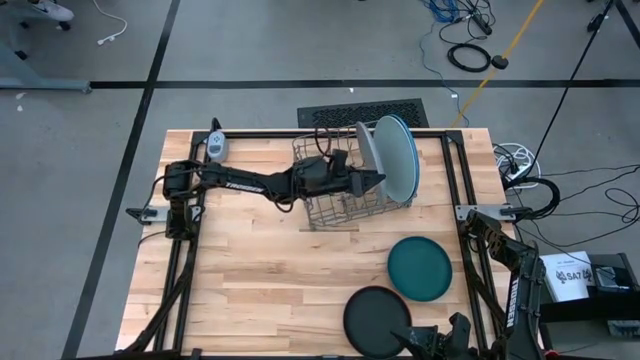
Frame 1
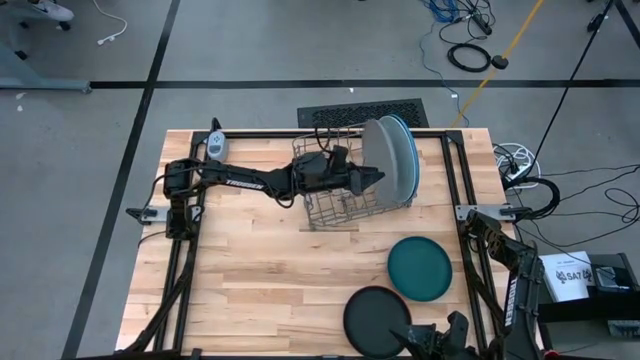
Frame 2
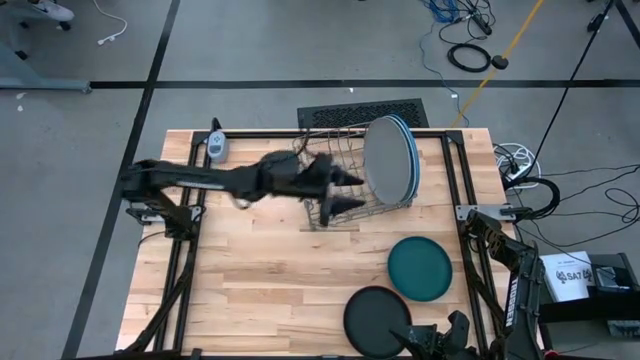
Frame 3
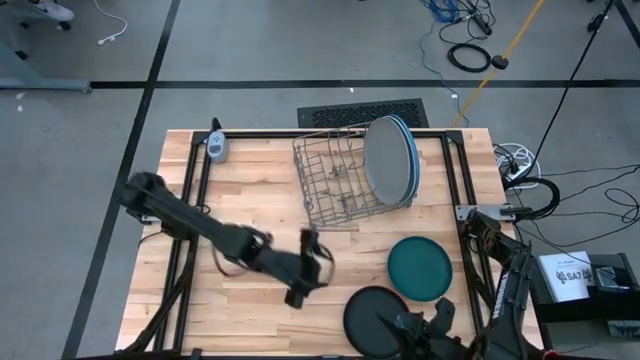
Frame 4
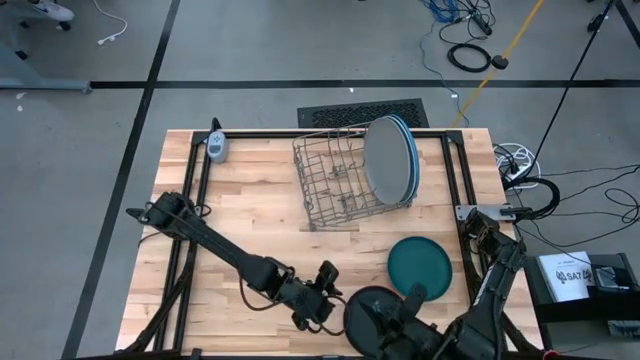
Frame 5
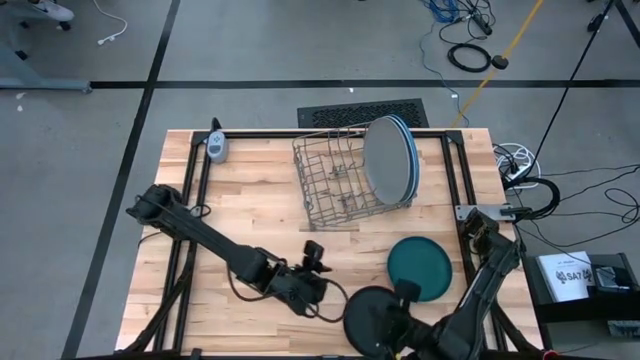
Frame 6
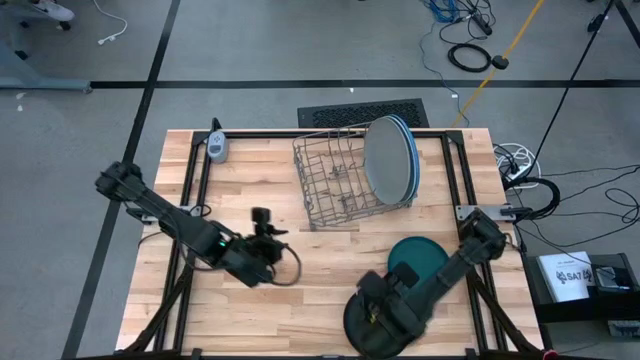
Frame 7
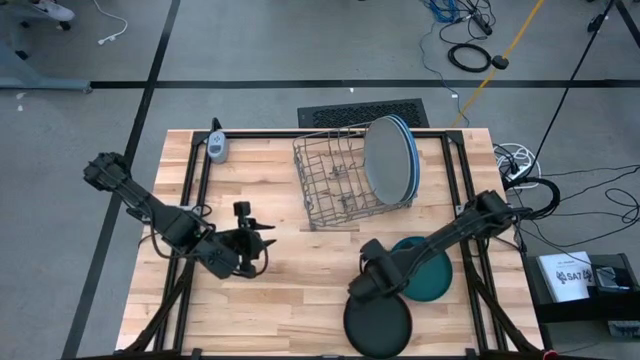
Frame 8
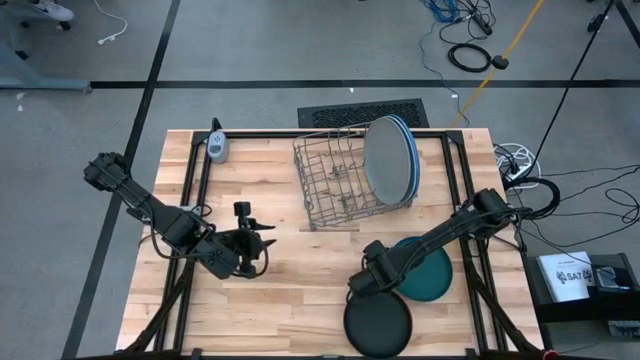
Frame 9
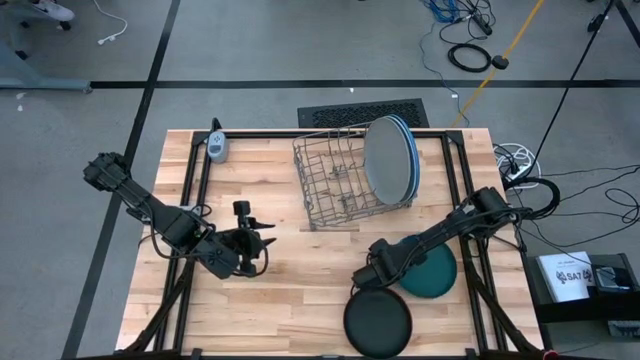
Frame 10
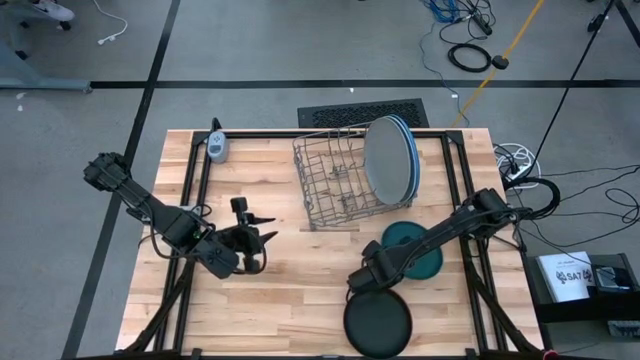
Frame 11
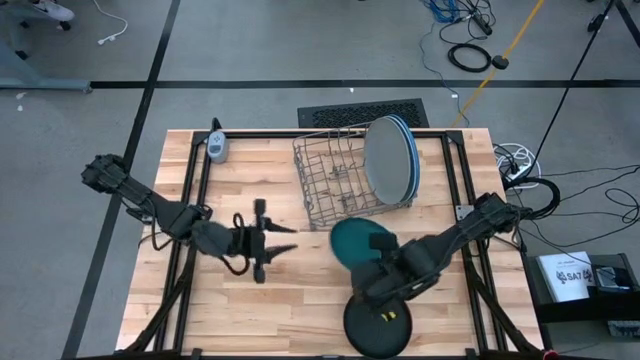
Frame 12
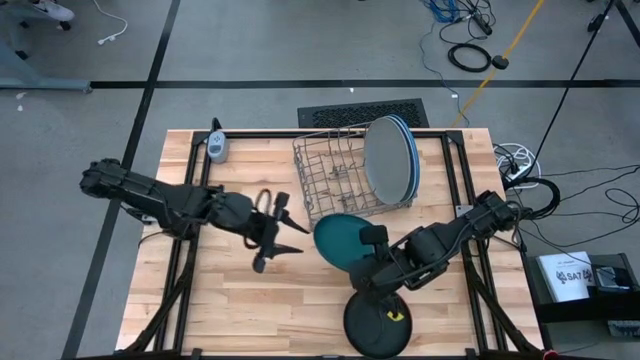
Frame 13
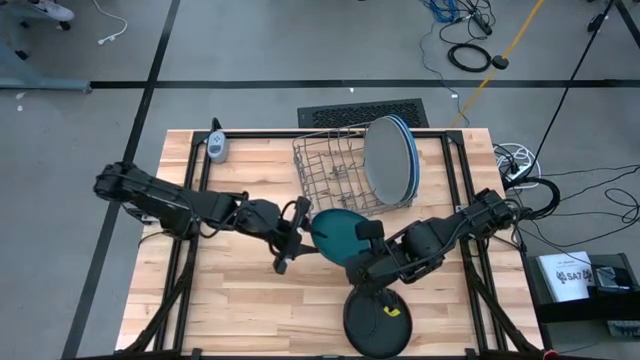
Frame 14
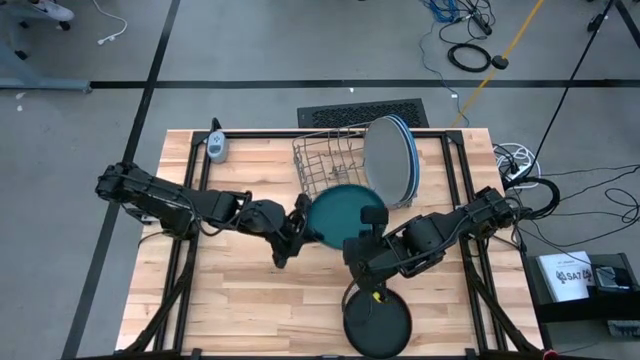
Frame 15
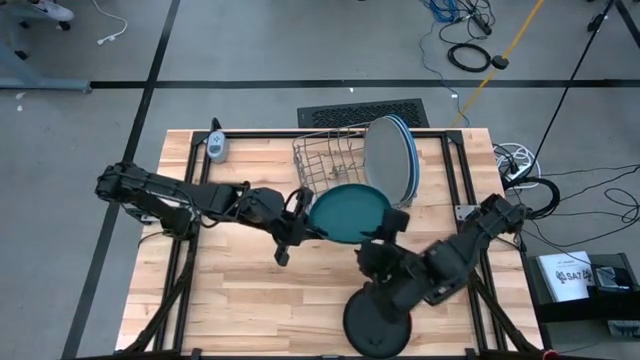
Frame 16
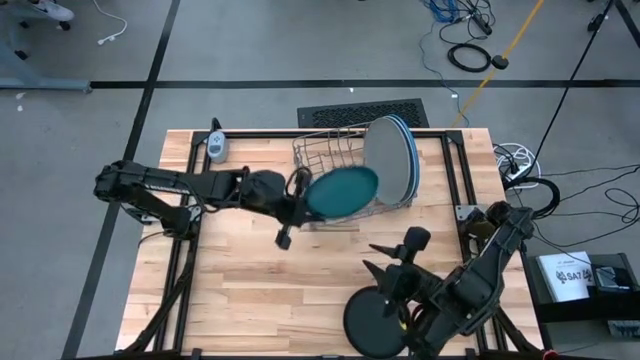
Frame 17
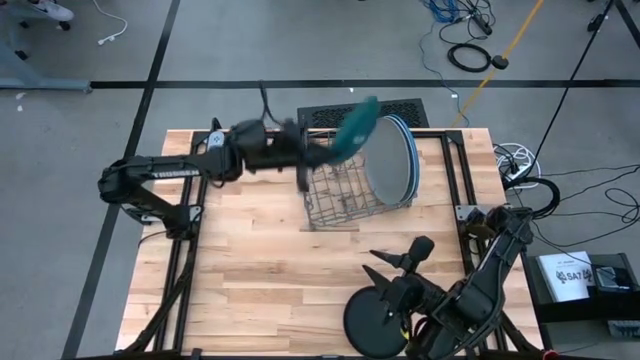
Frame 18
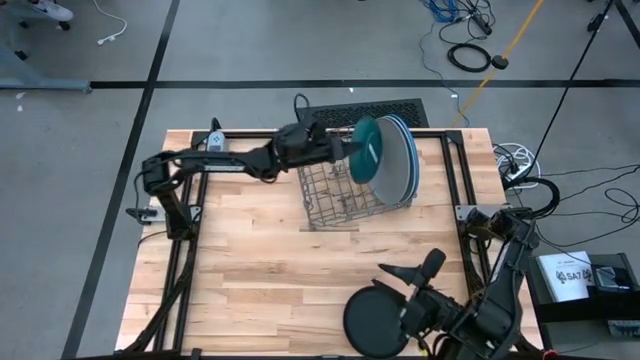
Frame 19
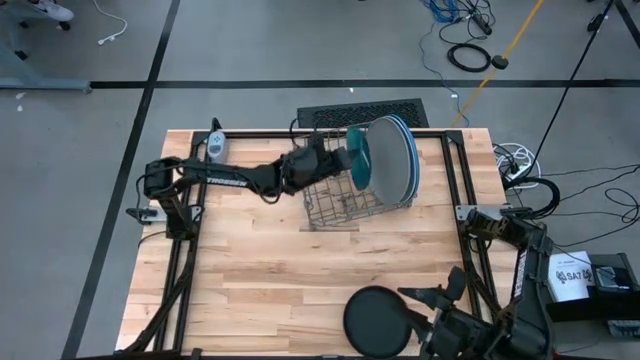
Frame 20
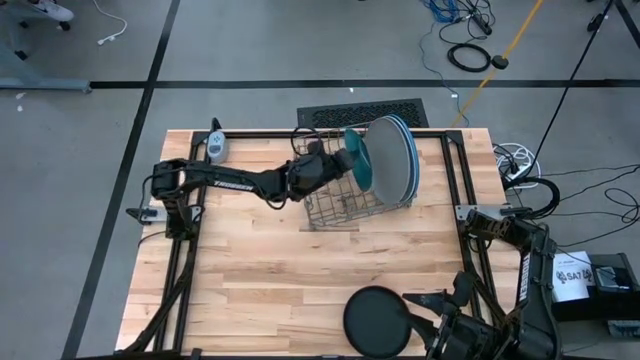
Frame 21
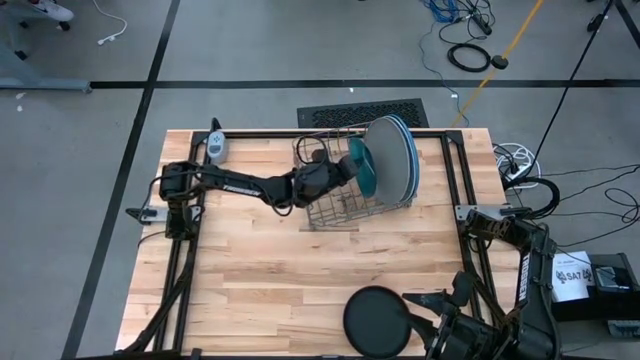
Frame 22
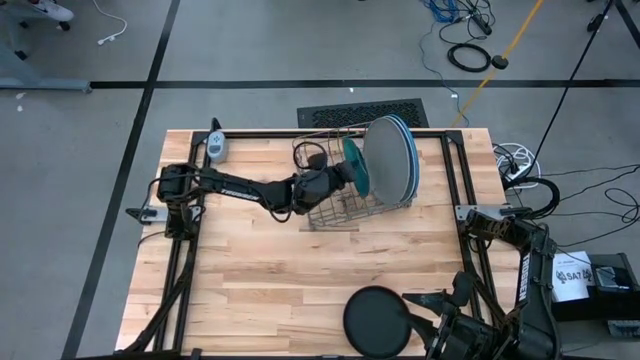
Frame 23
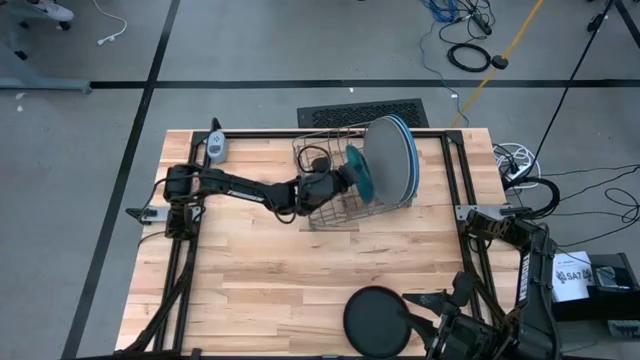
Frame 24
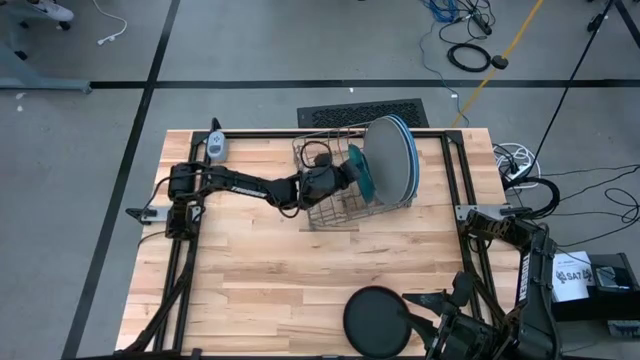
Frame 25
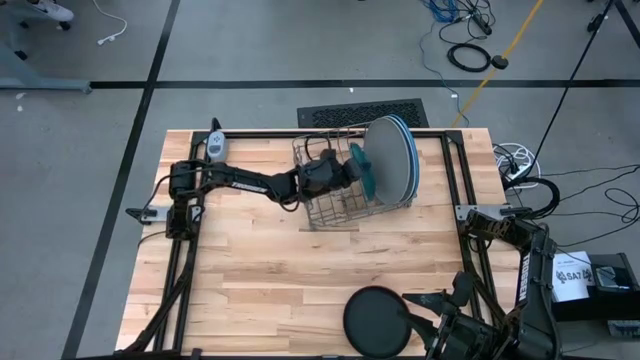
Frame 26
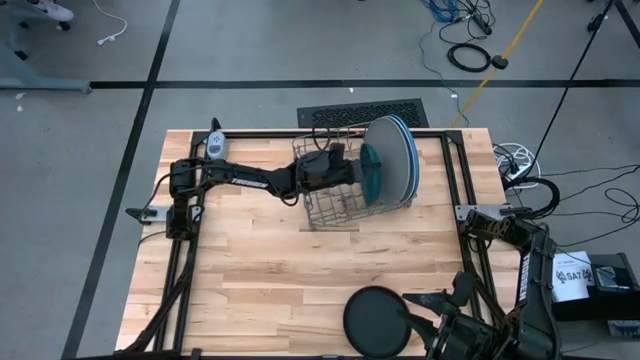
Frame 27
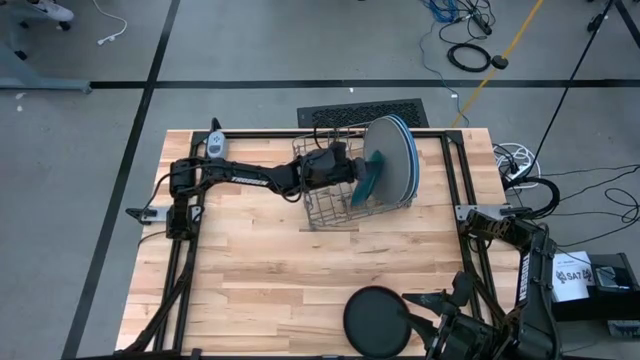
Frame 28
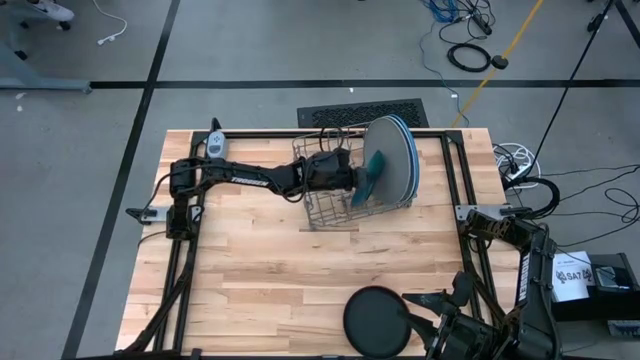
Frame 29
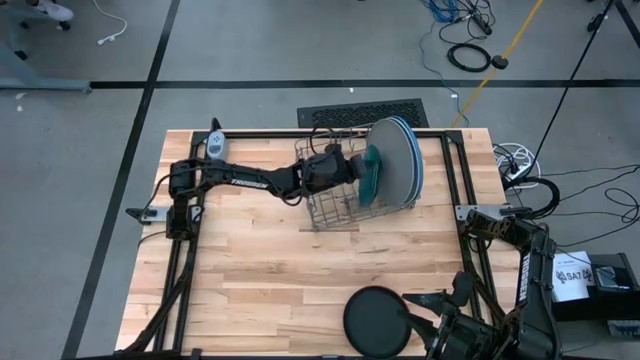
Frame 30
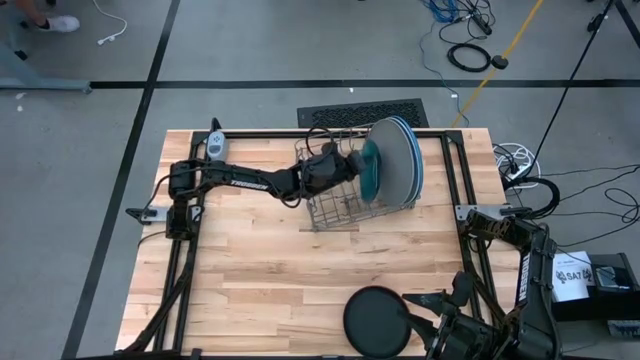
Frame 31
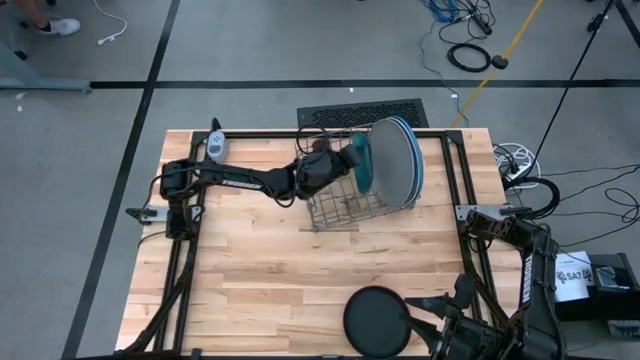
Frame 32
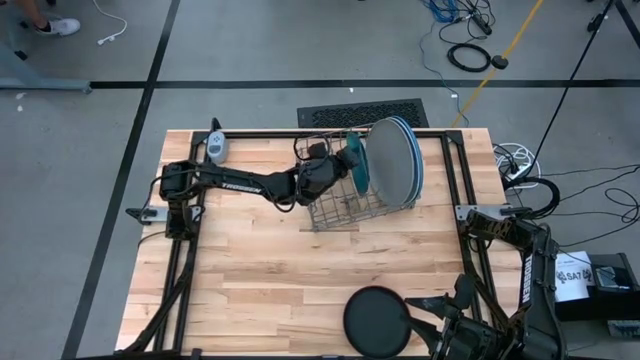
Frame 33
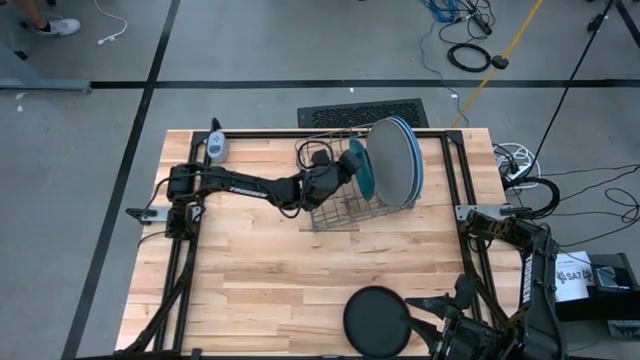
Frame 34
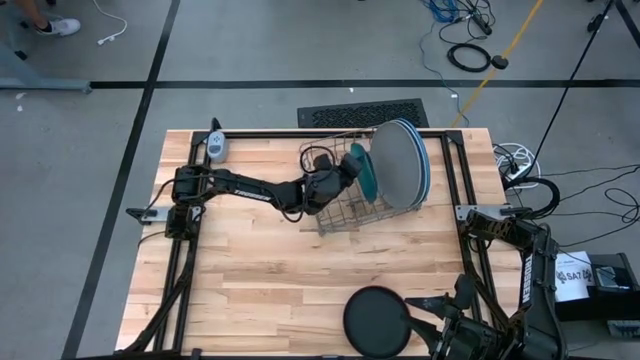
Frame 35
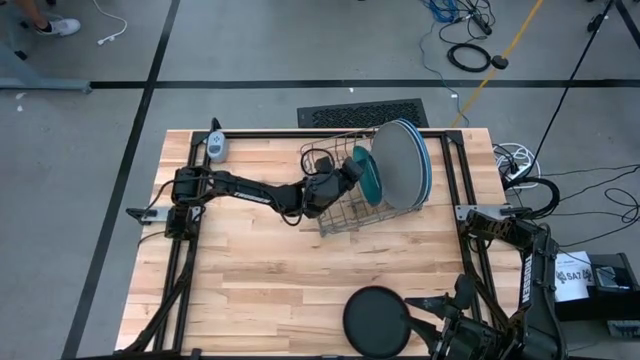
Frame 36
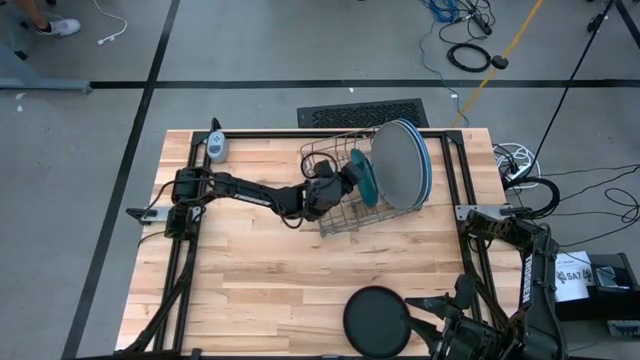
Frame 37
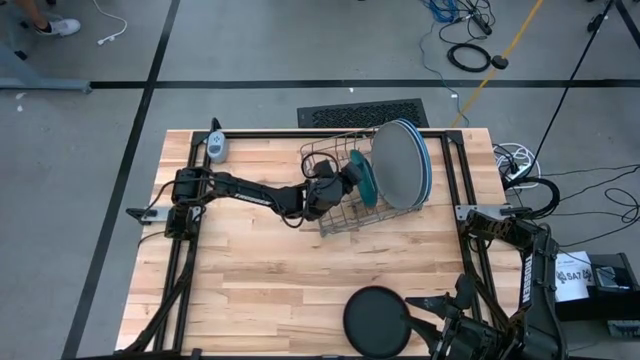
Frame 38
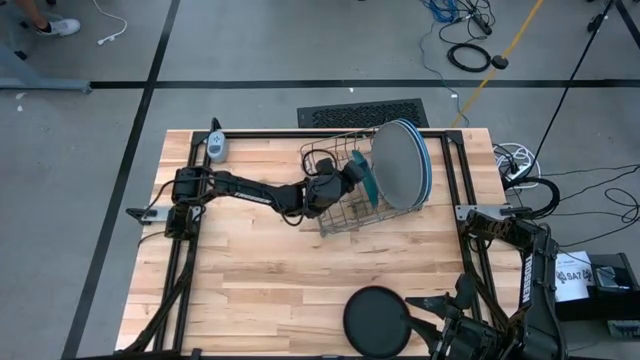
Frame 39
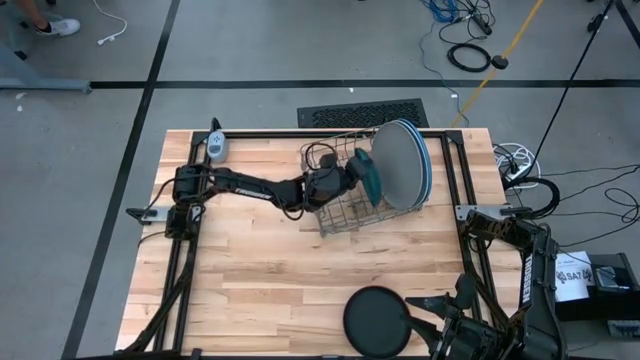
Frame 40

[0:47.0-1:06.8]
Task: Sort dishes
Put the green plate in the dish rack

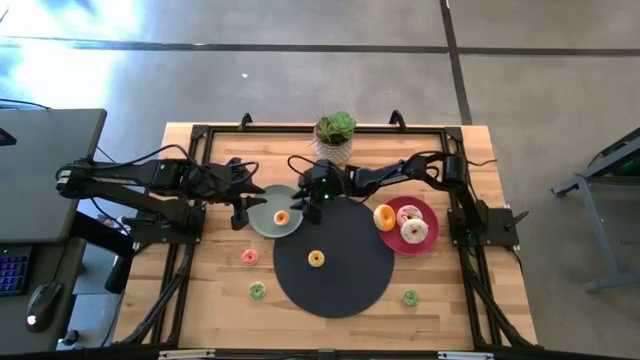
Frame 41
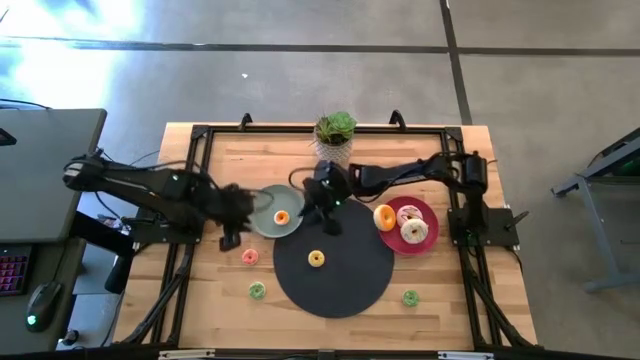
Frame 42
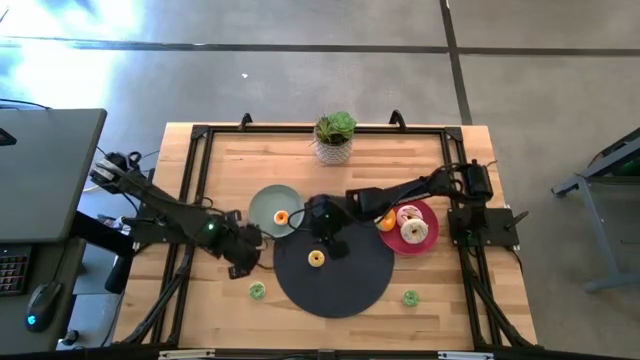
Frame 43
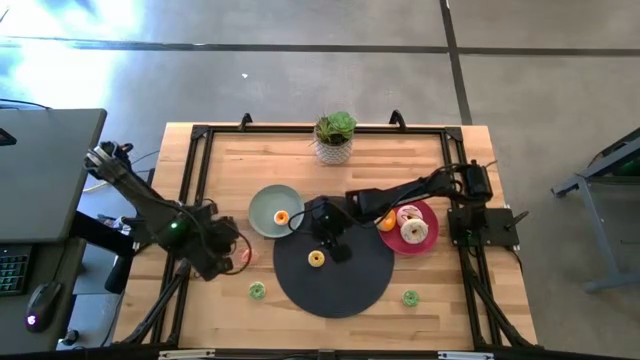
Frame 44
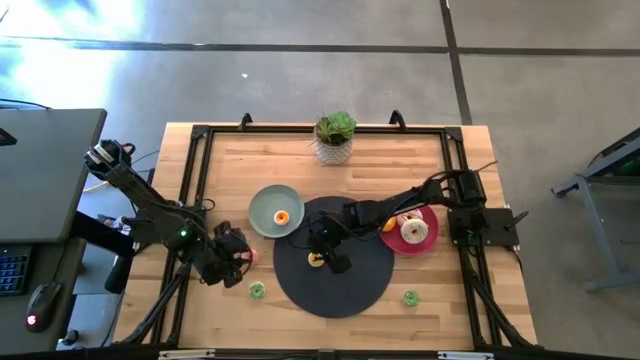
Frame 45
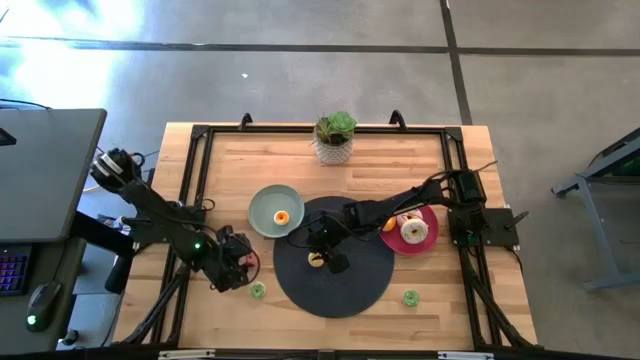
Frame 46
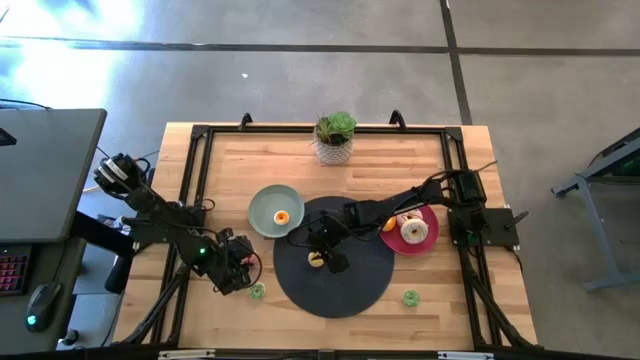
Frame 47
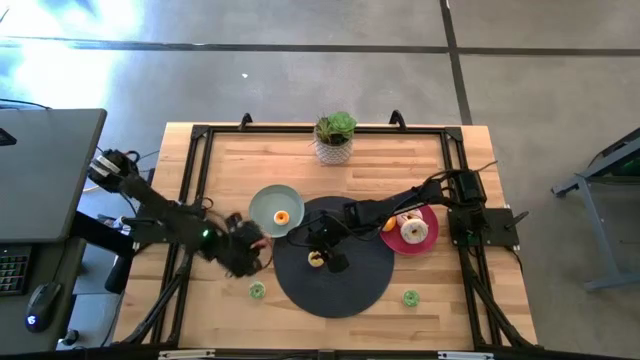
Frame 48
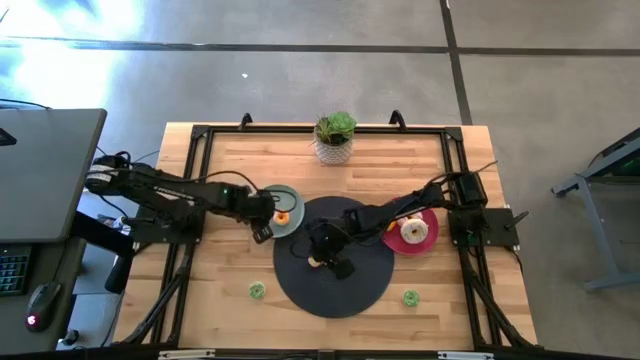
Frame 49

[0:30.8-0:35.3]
Task: Pick & Place donuts
Put the small pink donut on the blue plate
